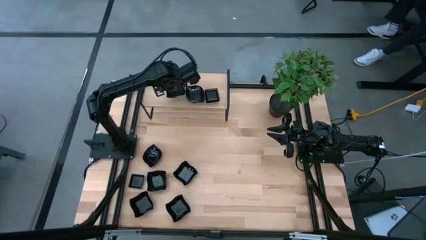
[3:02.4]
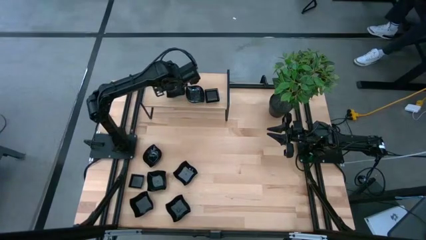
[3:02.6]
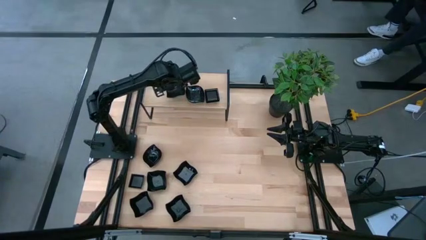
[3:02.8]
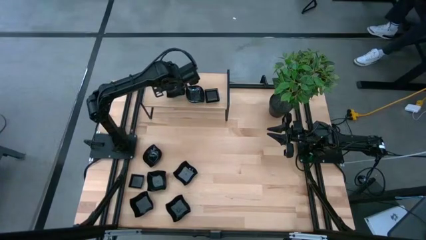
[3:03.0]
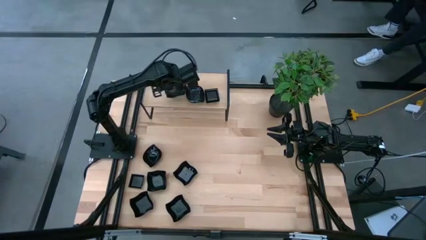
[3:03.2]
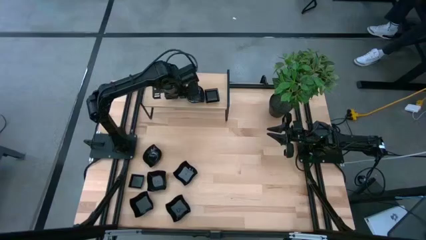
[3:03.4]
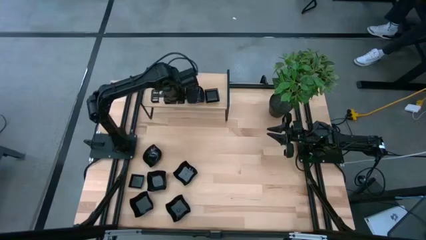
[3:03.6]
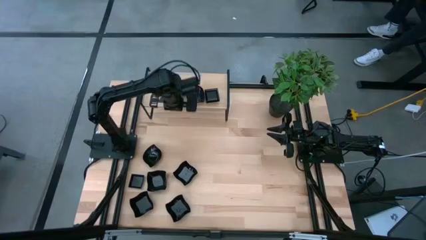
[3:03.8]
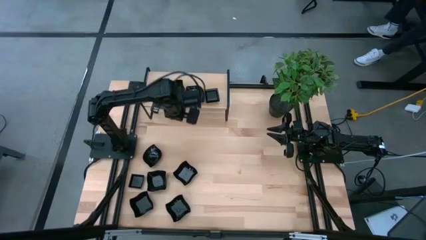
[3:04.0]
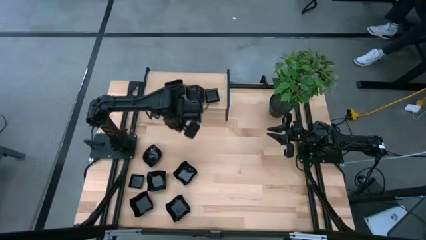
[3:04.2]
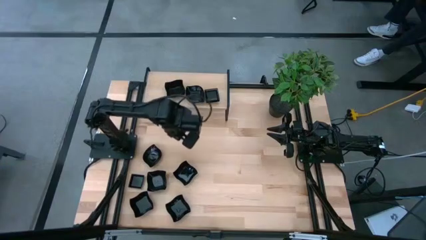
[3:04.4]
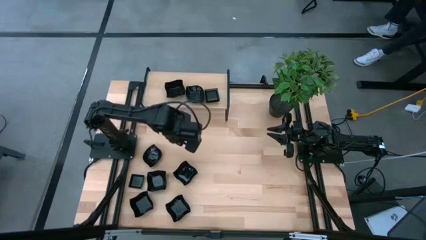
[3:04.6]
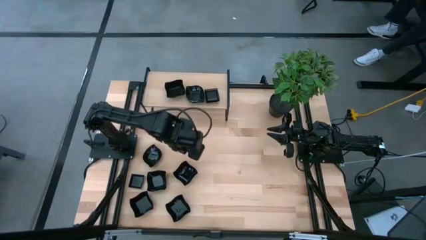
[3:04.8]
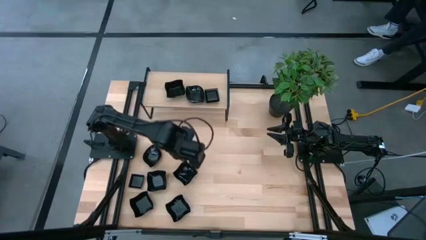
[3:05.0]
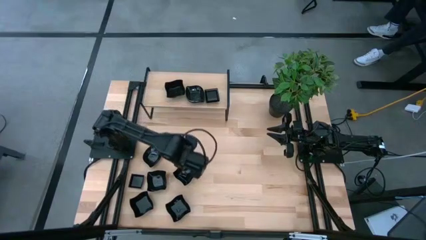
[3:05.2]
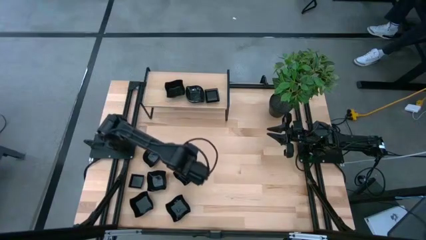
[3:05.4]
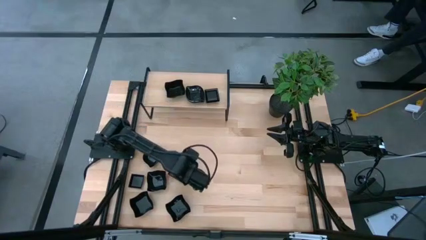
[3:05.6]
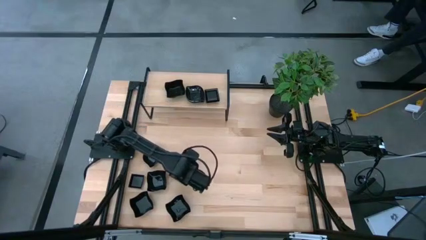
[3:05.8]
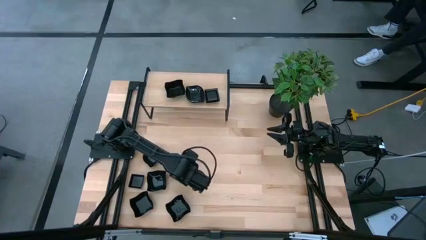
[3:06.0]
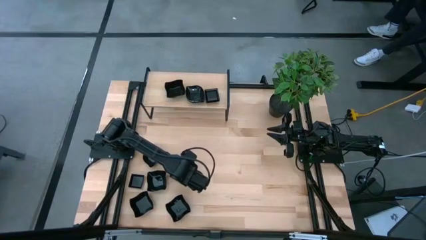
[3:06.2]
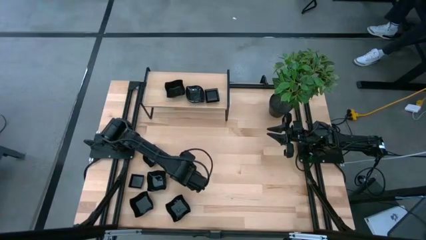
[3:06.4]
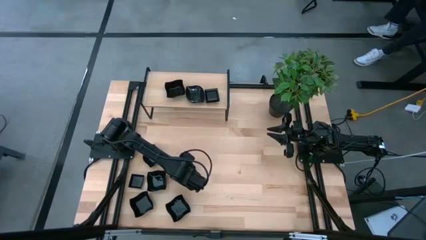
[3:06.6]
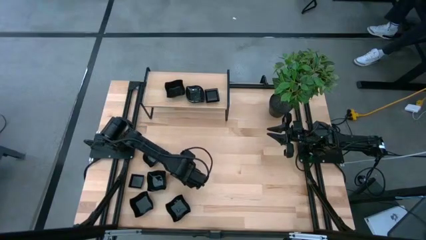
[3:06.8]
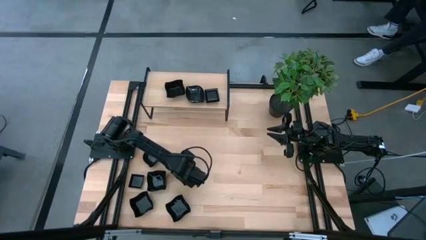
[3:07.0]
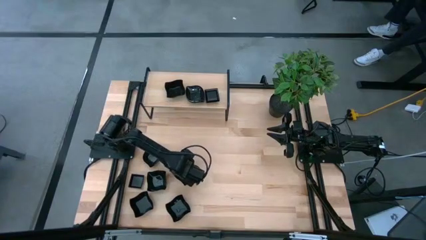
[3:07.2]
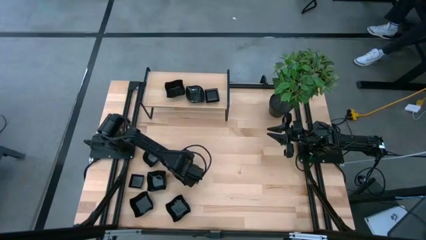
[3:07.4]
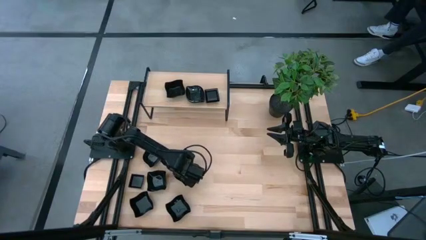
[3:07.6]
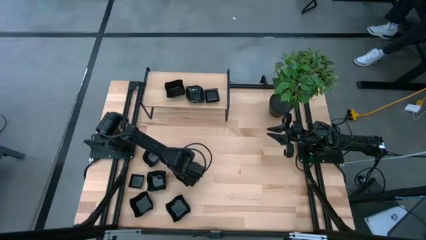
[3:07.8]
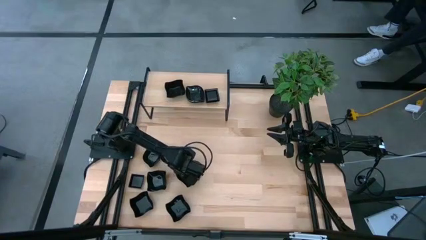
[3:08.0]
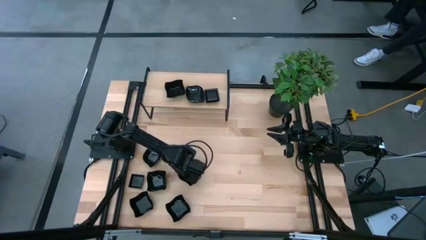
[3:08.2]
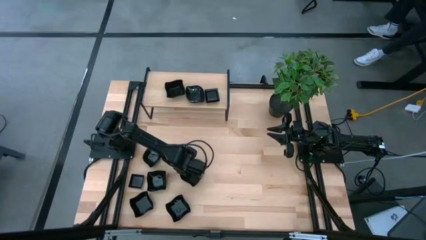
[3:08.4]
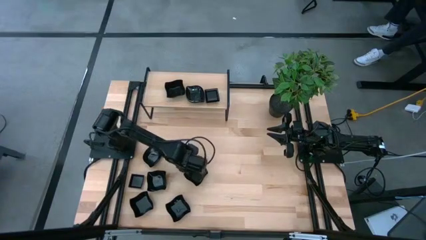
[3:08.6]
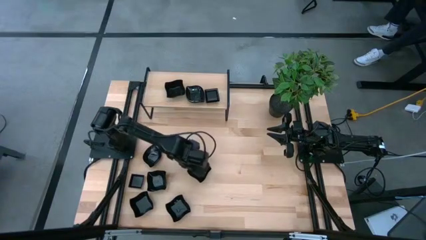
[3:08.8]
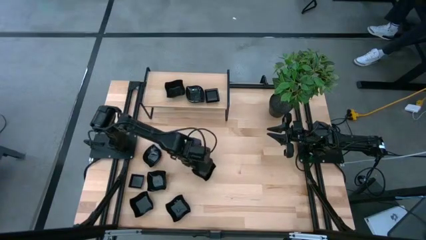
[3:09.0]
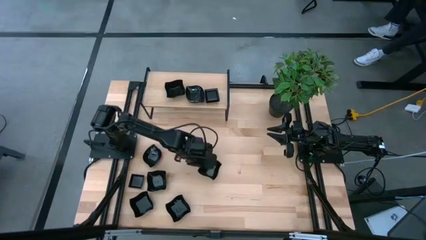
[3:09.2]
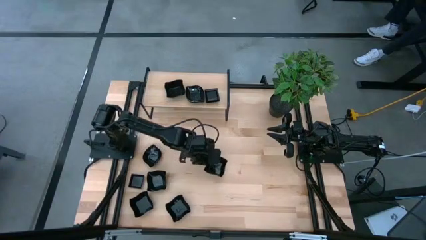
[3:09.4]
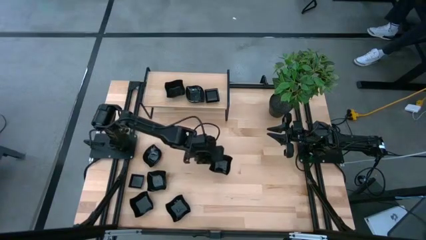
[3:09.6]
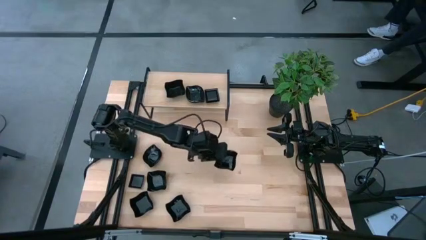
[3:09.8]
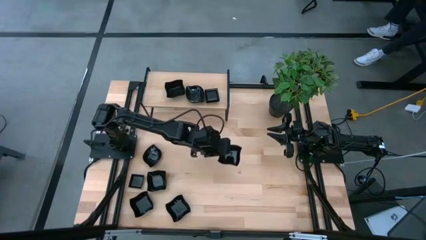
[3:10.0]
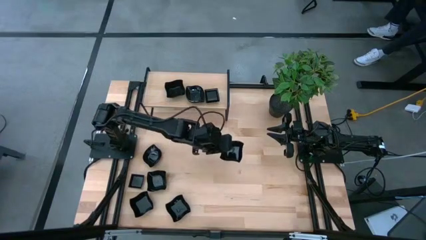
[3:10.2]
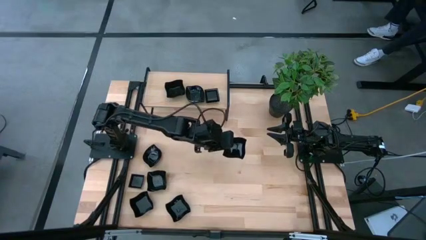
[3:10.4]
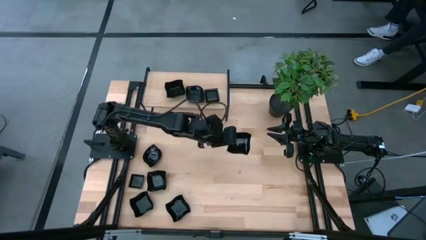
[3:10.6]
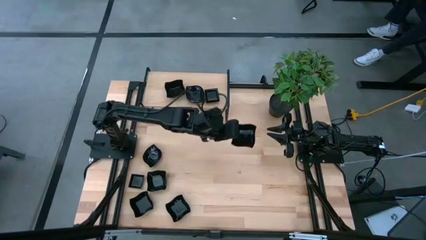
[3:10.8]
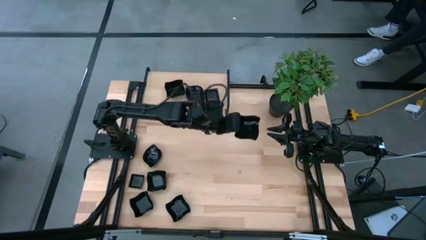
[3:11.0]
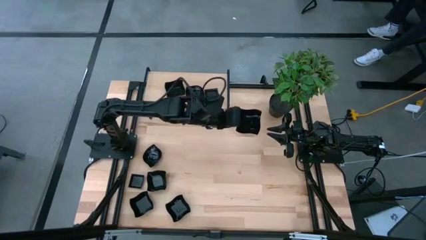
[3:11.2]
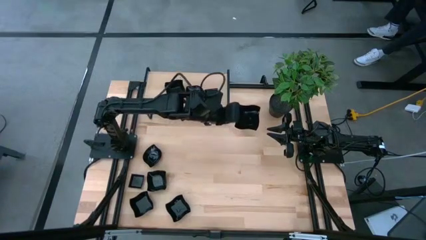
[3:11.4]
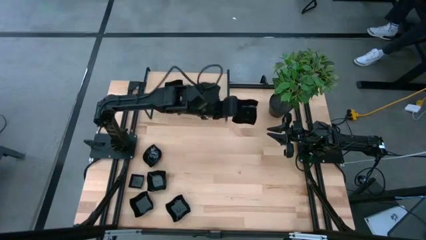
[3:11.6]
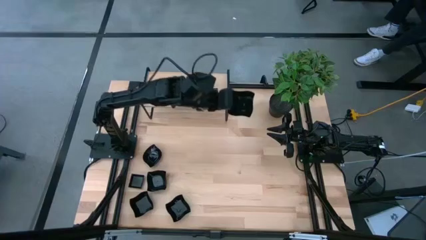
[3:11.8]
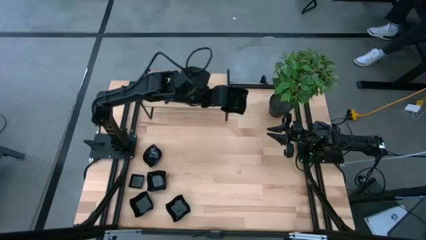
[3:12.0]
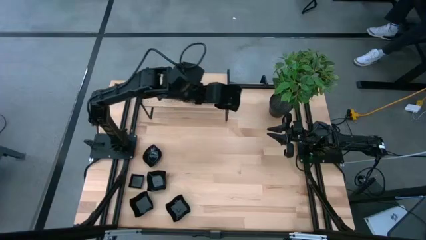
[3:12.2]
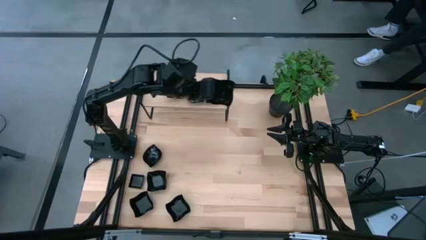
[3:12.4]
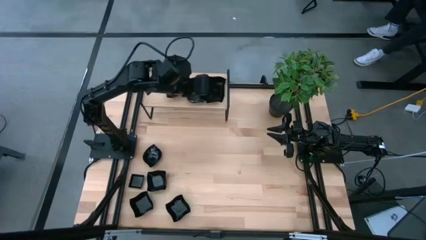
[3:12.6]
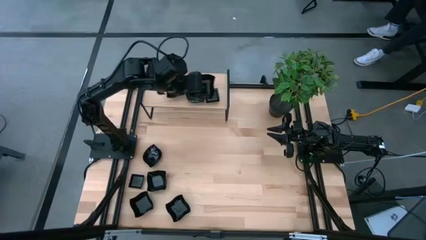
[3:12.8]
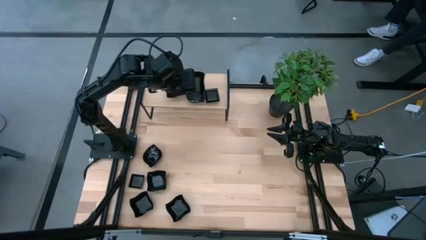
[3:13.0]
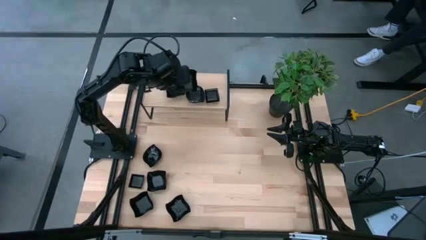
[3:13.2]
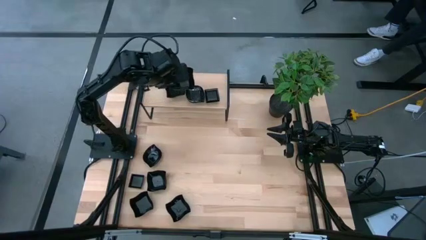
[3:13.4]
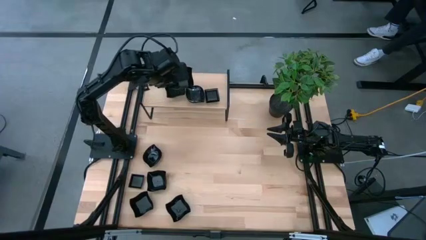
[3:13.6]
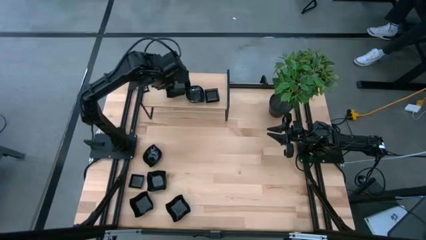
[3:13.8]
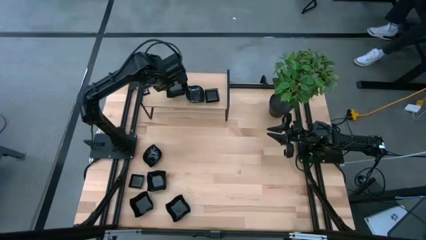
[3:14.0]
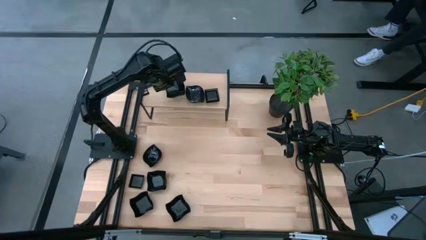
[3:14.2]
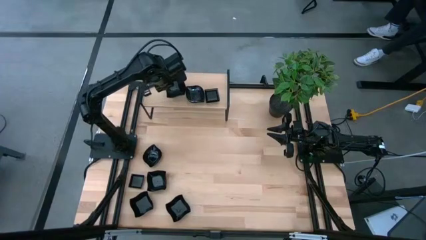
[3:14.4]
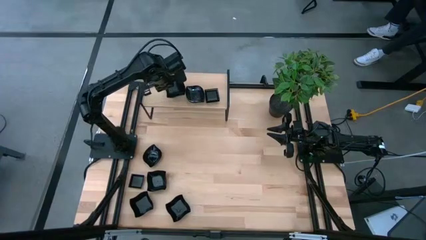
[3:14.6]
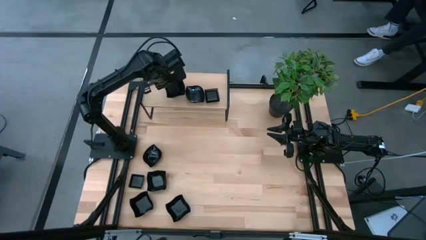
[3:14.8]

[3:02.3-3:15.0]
Task: Pick & Place Mini shaped plates
Stack the distorted square plate on top of the distorted square plates on the shelf

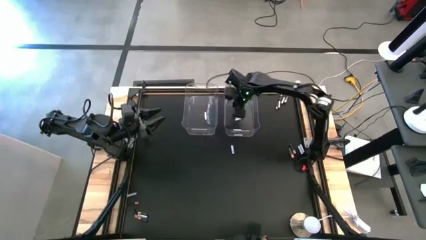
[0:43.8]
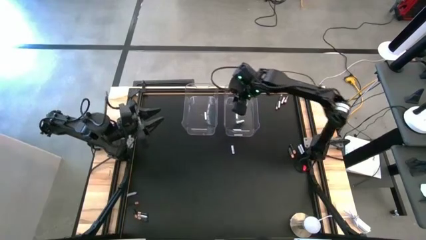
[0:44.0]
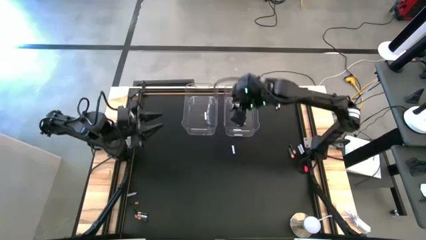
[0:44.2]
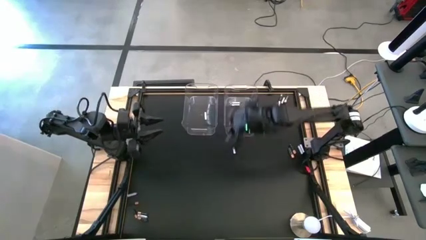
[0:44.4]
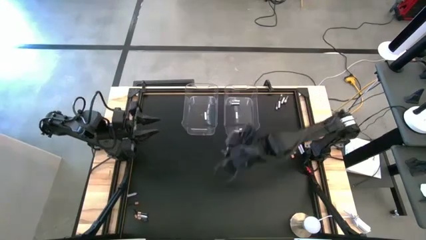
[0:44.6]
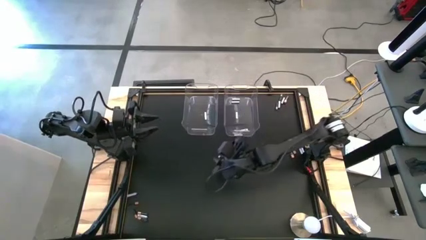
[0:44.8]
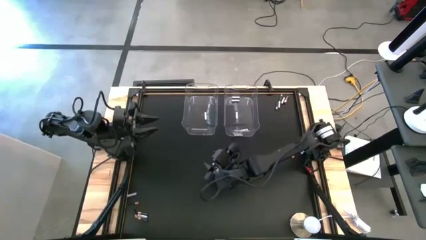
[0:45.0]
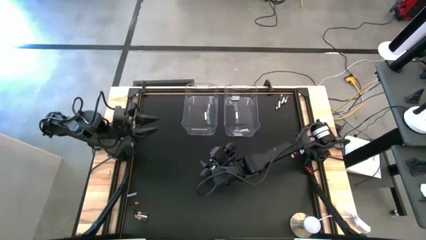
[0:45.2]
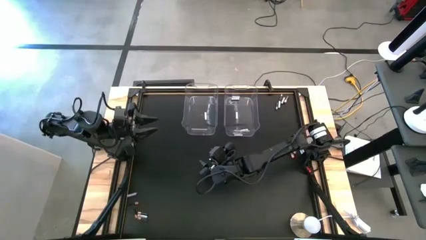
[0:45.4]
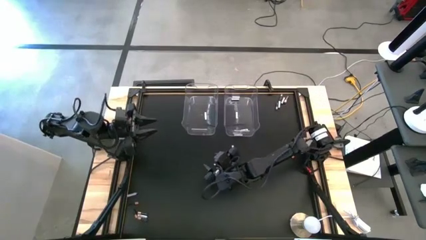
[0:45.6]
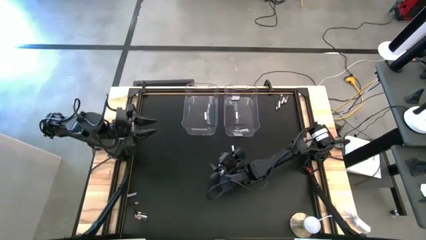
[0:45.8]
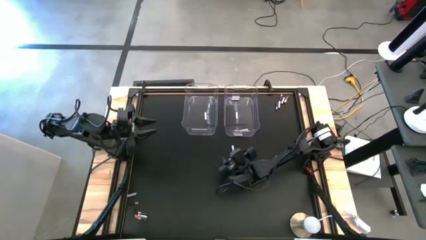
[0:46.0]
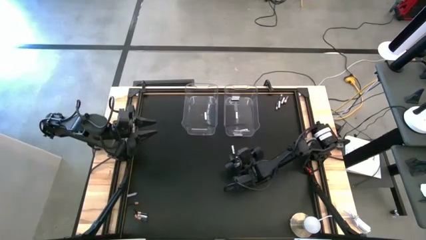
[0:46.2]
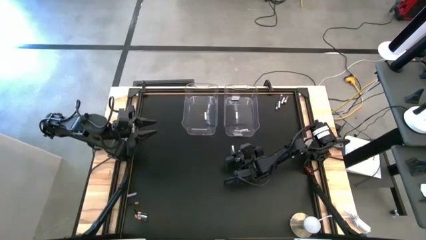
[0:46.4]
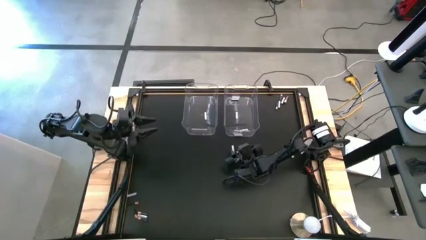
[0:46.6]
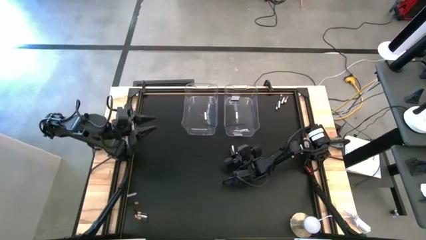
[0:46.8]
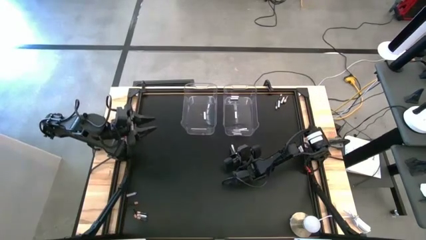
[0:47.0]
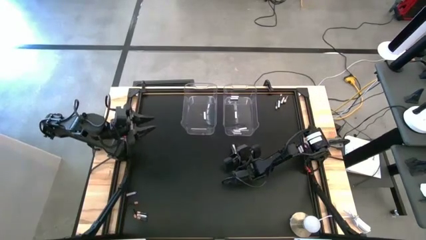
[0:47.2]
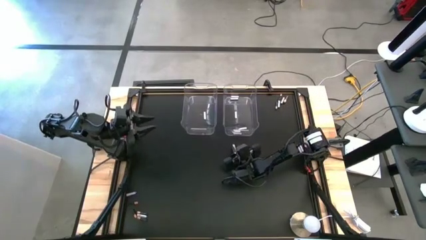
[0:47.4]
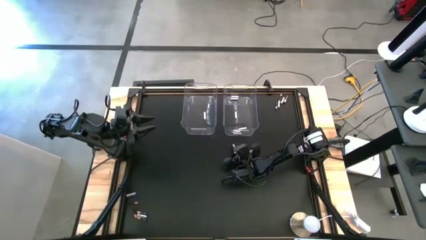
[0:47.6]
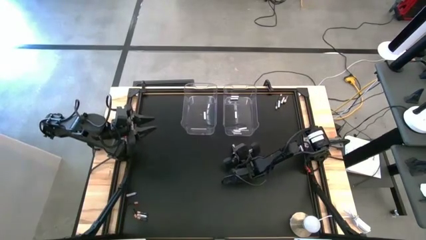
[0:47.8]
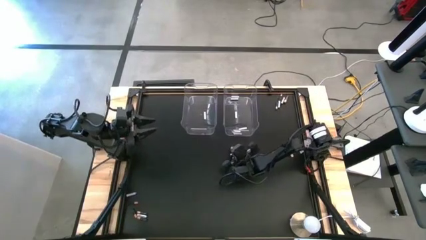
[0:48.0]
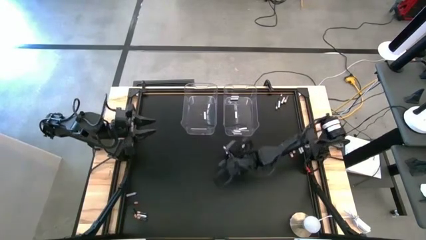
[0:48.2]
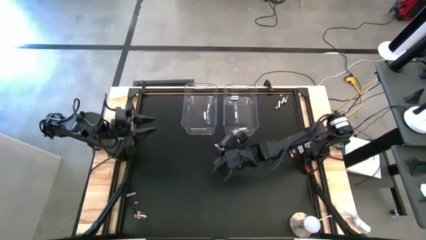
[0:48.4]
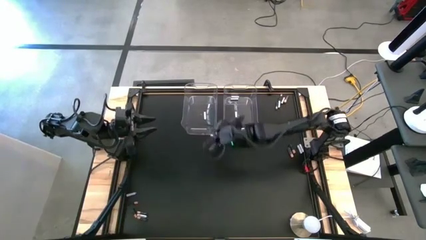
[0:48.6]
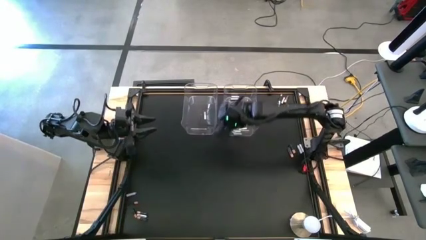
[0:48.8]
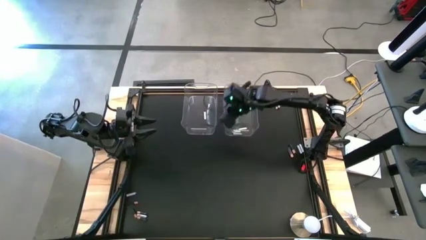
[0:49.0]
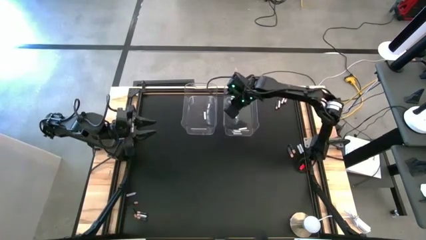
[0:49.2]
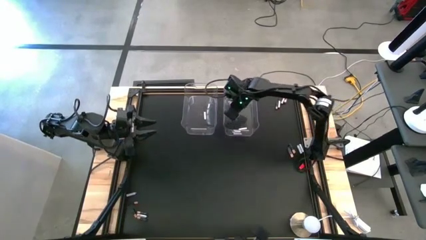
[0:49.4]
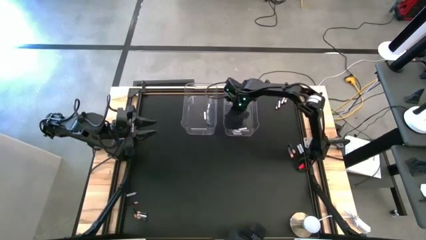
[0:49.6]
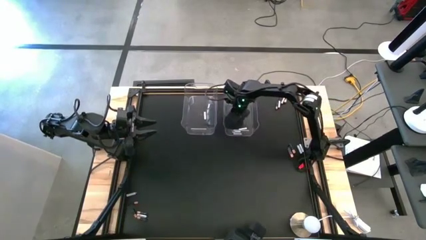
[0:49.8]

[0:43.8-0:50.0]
Task: Sort batteries
Put the white battery into the right transparent bin
